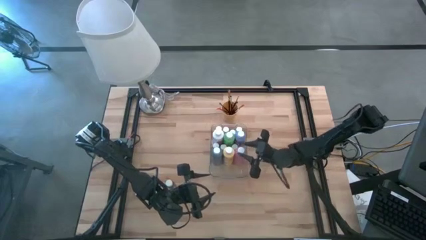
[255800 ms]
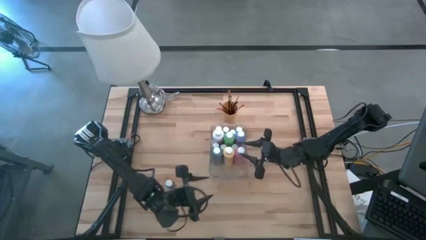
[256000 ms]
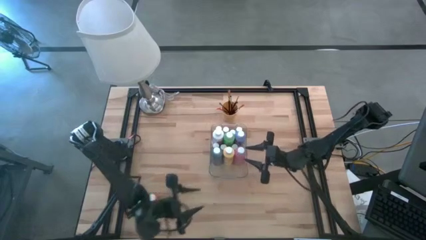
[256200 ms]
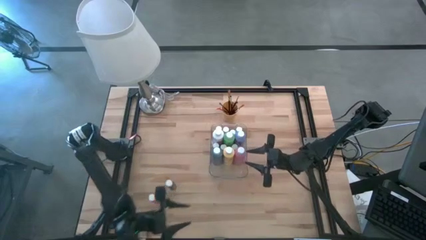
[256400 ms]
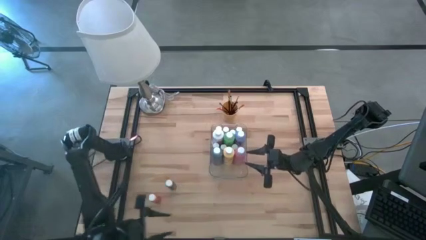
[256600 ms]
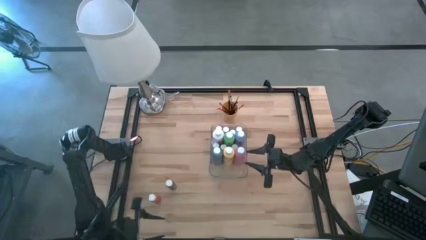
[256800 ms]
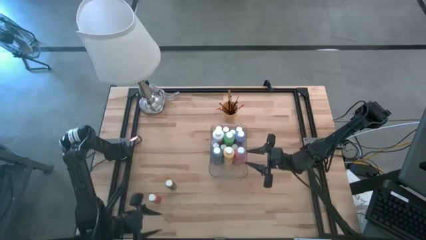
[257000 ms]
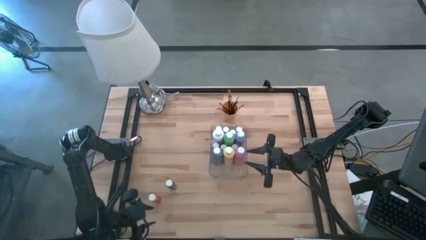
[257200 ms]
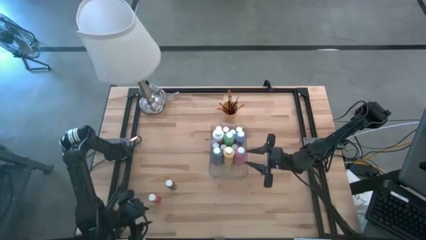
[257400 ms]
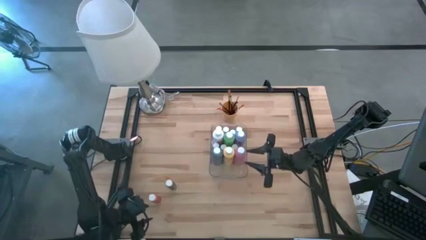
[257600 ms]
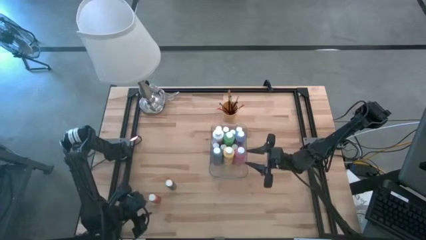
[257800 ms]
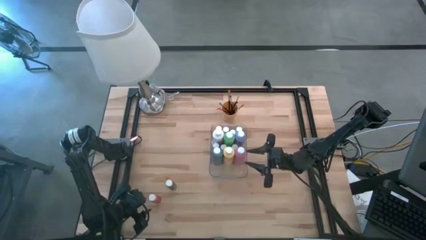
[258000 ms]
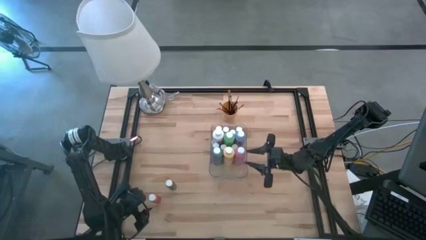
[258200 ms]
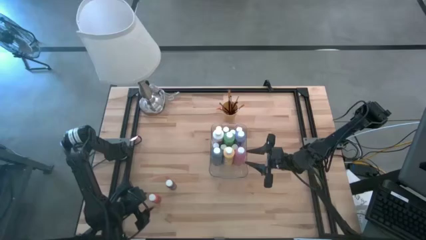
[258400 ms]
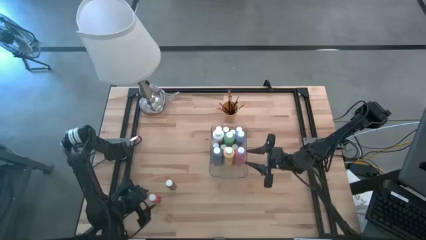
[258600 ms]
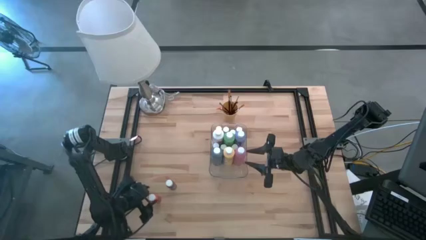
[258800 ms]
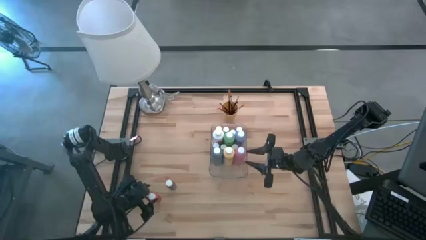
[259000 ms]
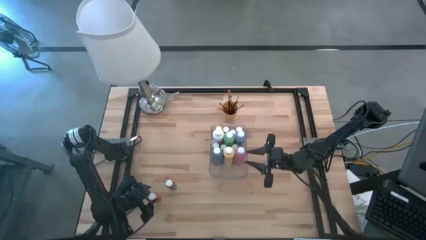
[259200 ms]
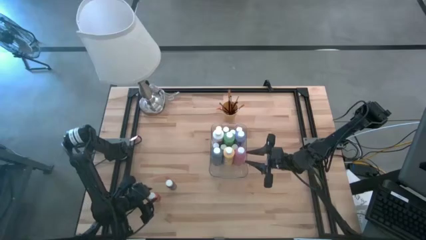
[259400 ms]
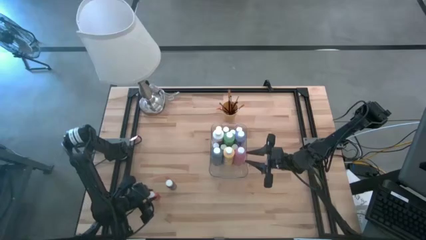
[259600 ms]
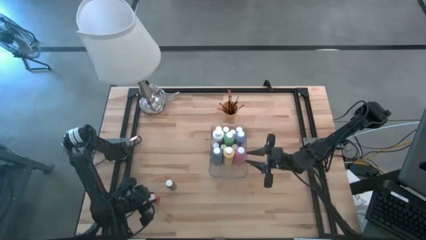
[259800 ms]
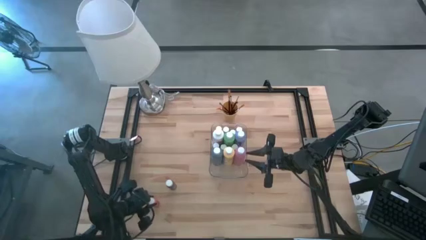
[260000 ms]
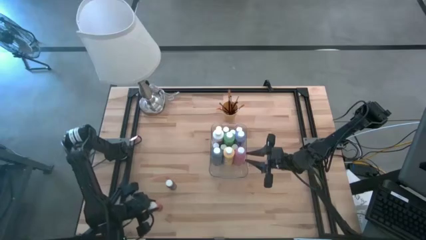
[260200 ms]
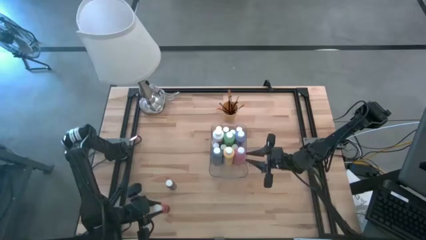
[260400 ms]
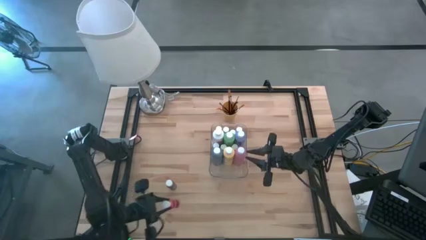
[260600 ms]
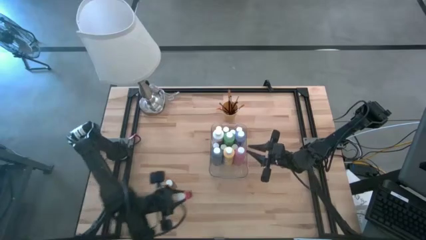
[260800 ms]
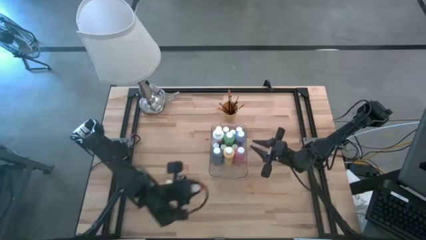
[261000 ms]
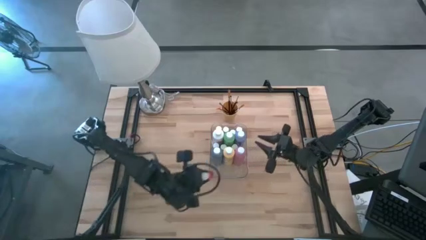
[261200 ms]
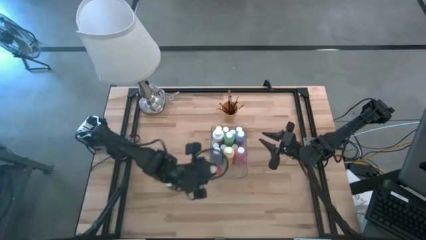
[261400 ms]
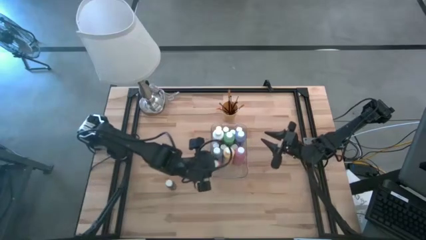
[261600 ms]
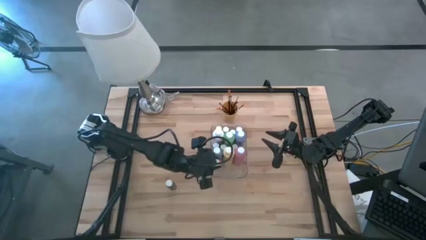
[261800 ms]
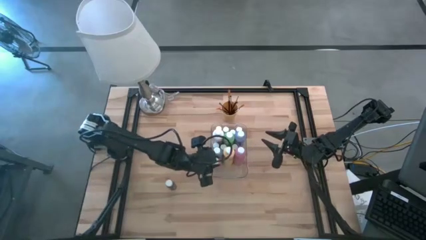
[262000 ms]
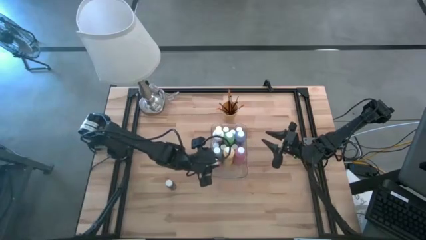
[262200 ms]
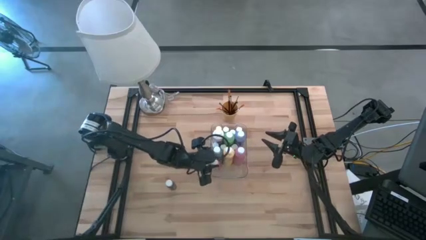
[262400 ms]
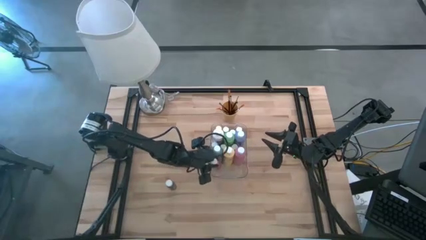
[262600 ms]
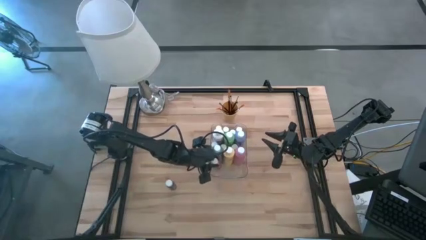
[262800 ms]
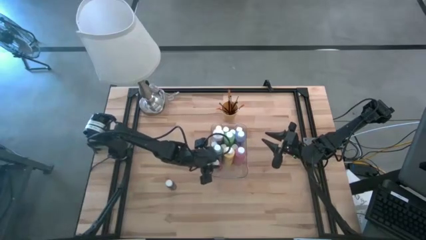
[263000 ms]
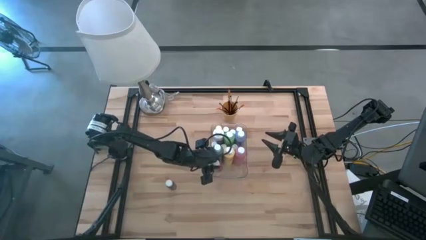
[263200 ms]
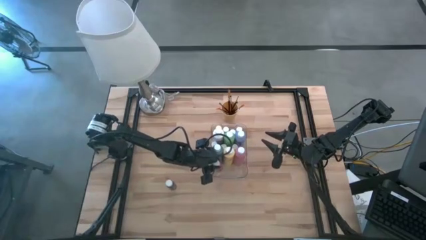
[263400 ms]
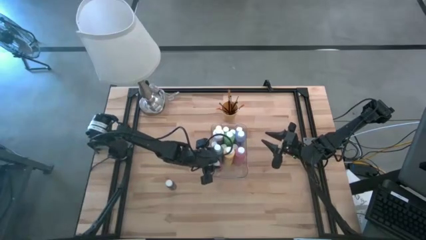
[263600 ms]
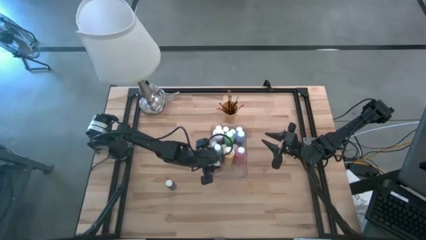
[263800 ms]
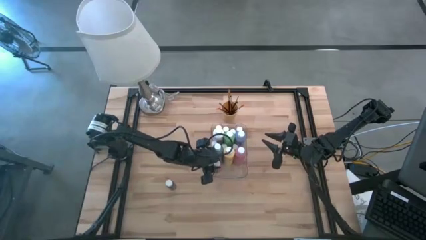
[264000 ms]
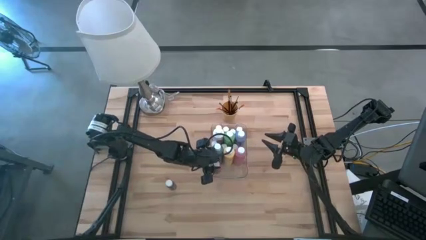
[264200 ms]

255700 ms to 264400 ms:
Task: Pick & Place Paint Supplies
Put the small dark orange paint bottle into the transparent bin

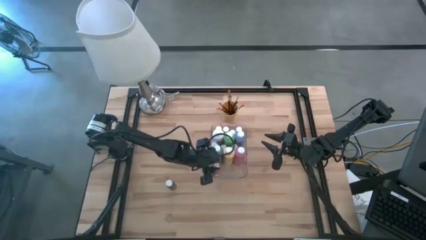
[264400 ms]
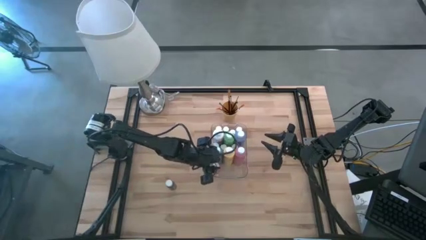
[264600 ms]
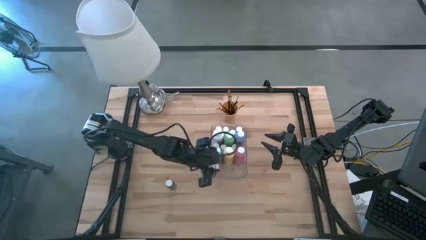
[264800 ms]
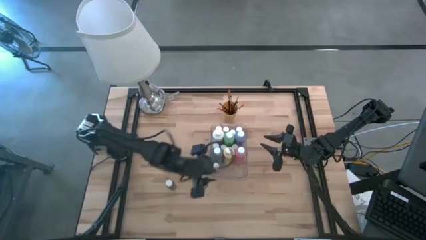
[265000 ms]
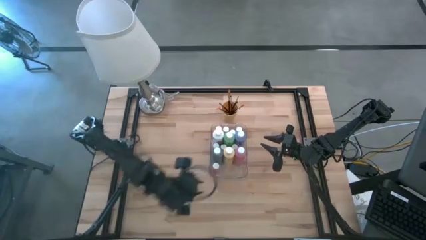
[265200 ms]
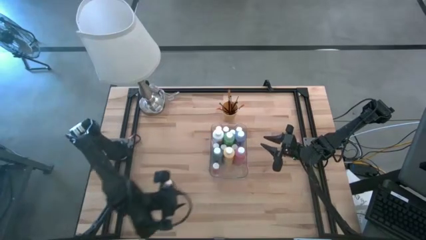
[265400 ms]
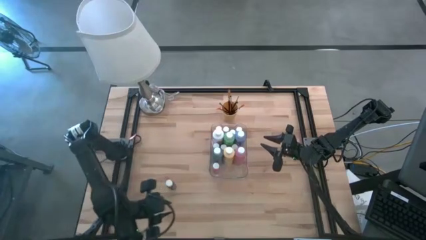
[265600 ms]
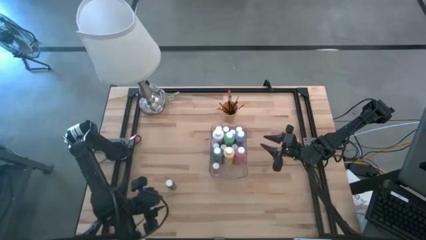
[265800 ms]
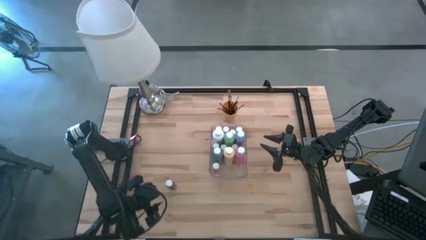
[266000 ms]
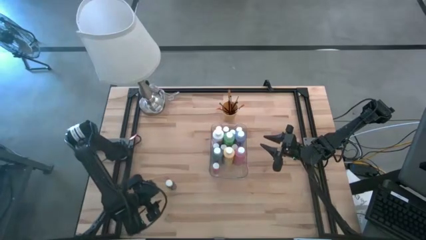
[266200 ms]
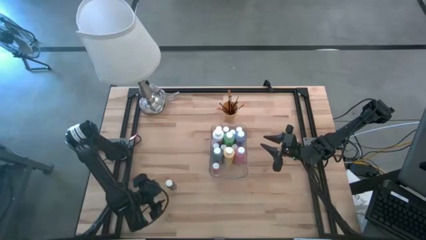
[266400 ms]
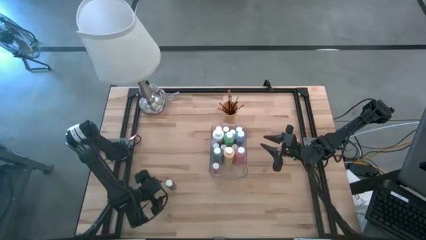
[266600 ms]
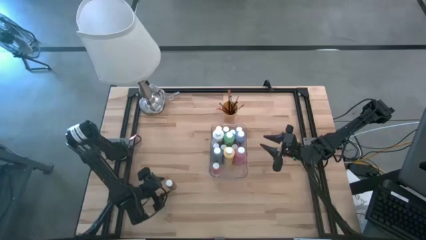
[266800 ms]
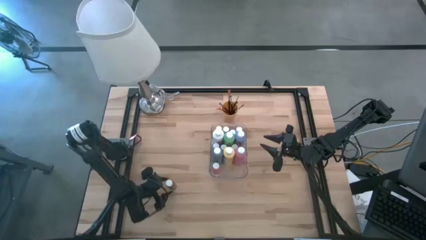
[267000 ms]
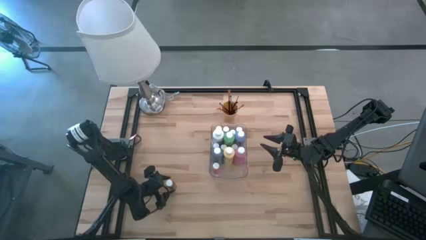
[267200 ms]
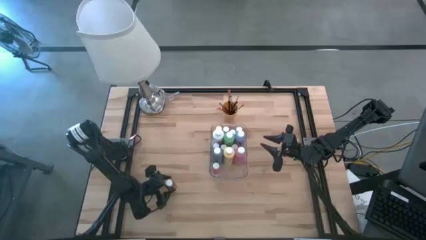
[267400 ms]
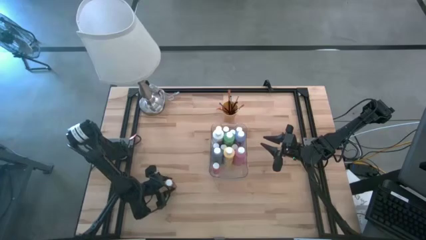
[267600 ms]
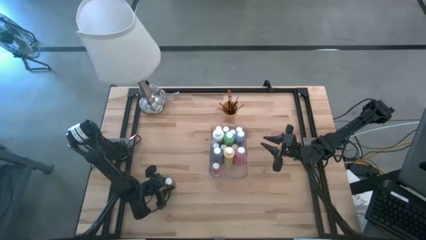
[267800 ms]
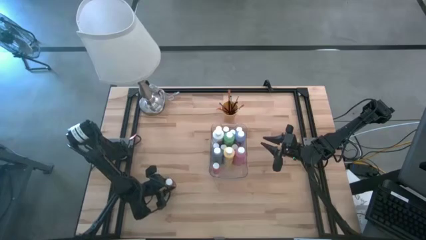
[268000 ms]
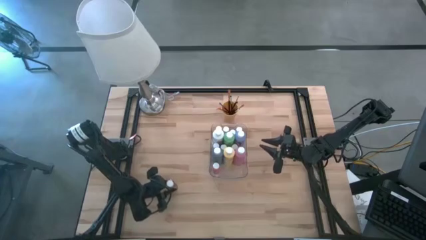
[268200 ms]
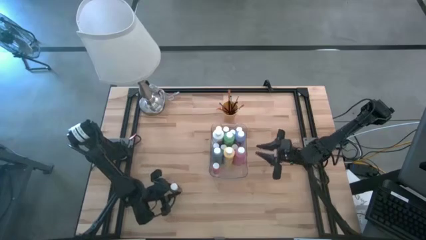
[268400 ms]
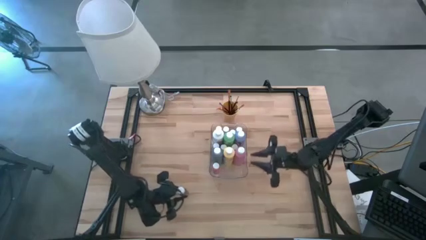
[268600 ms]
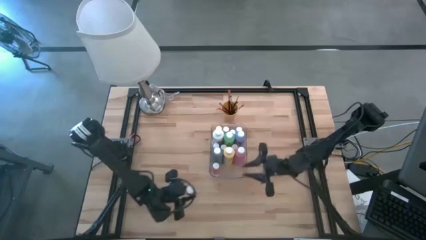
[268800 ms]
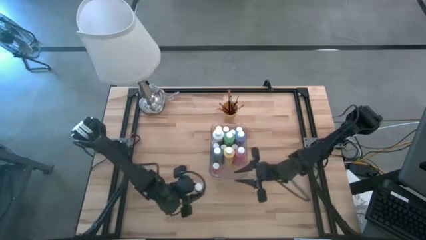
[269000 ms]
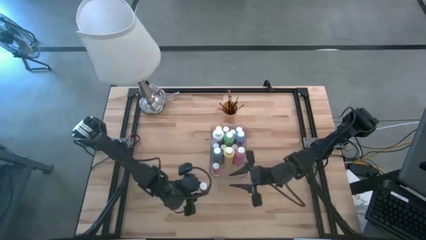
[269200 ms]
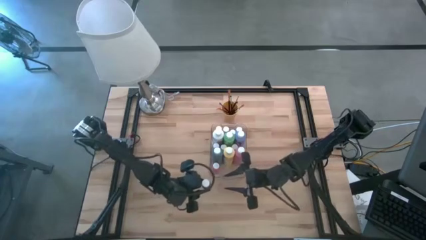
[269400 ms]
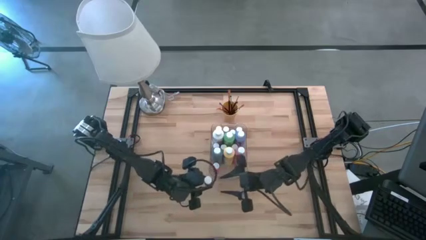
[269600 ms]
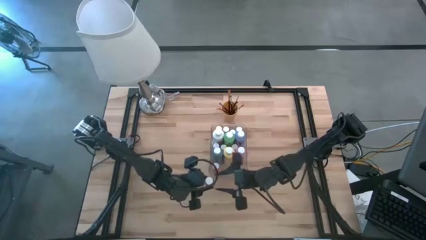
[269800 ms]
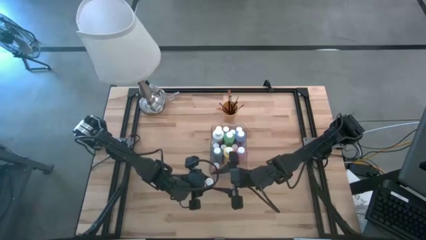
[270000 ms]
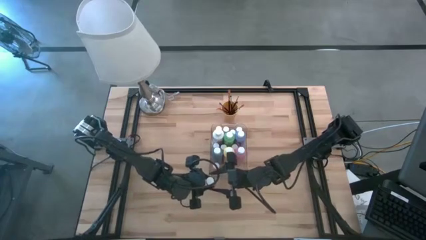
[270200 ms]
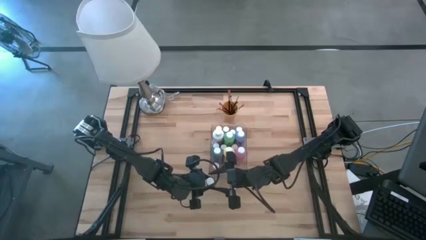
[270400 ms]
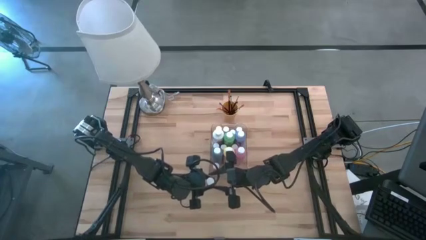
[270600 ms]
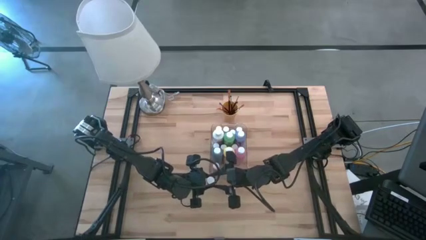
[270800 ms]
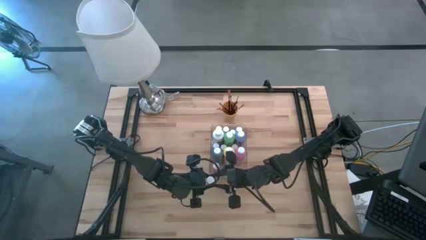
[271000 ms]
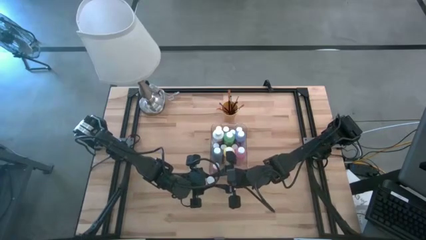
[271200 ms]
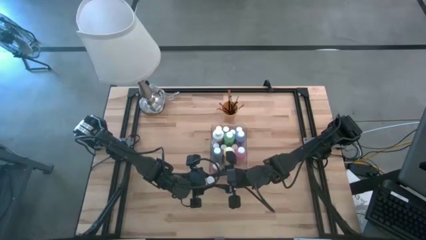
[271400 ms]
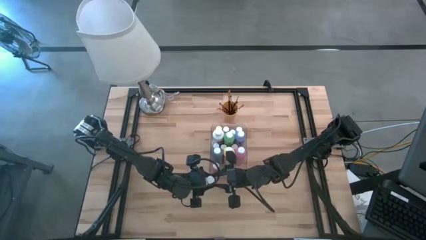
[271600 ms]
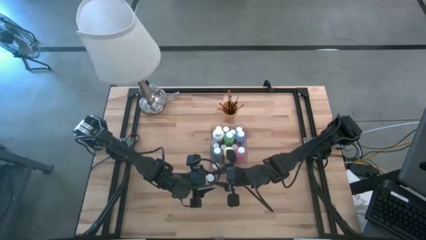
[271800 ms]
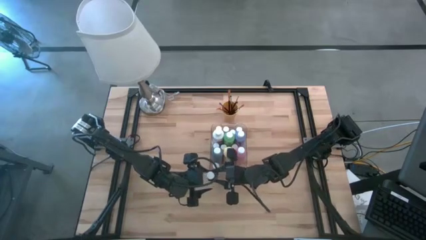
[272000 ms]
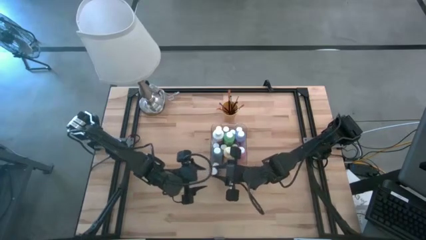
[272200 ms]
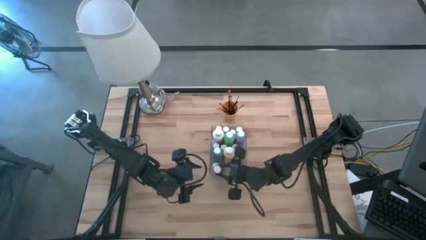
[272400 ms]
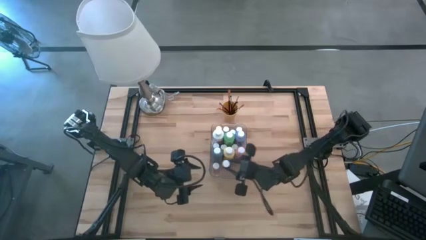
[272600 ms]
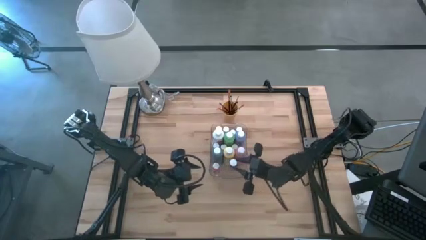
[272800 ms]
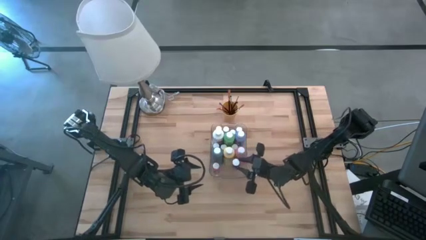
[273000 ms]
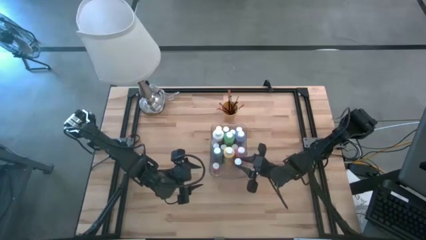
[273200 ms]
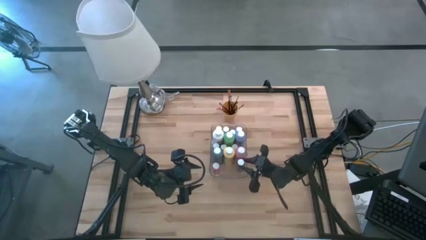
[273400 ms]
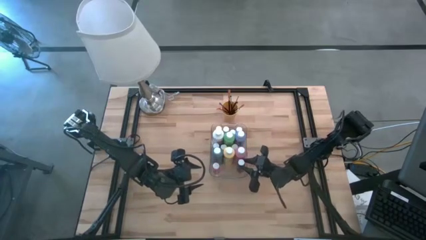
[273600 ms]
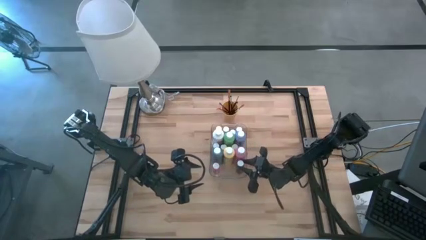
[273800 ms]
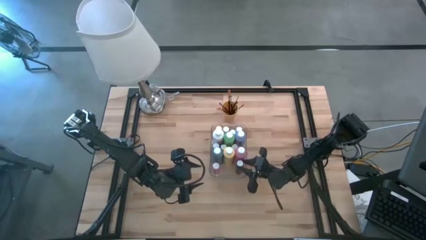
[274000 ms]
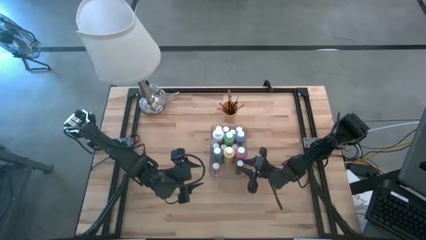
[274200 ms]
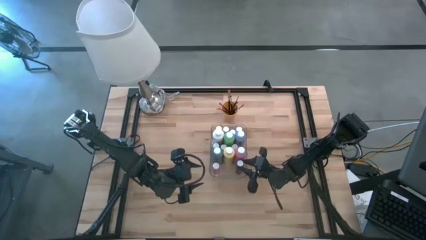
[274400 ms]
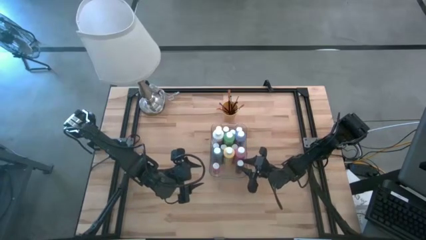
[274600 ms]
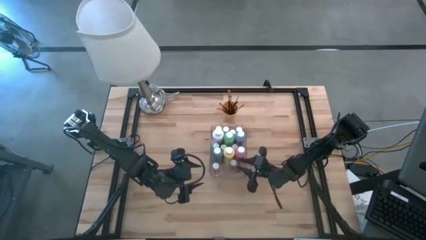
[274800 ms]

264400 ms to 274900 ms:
Put the small black paint bottle into the transparent bin
